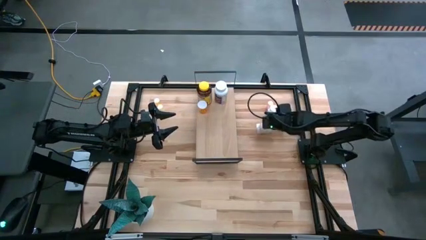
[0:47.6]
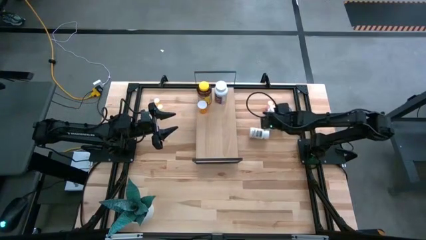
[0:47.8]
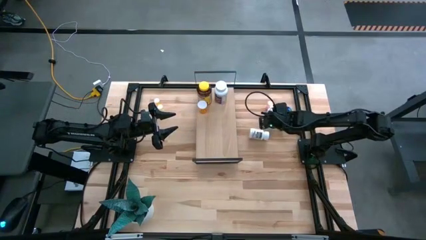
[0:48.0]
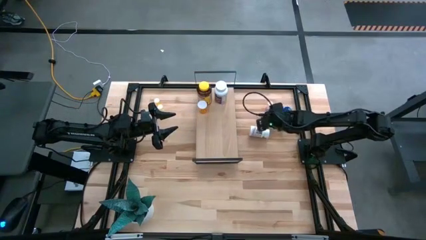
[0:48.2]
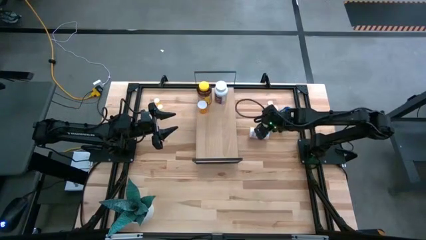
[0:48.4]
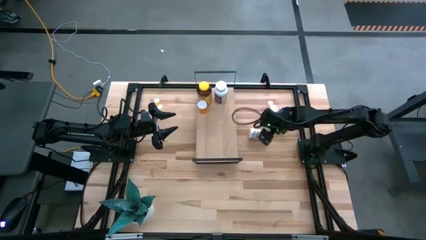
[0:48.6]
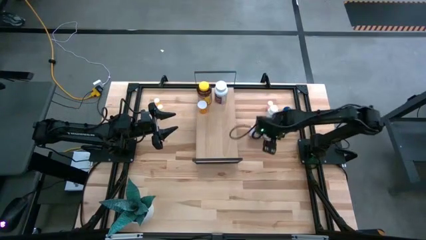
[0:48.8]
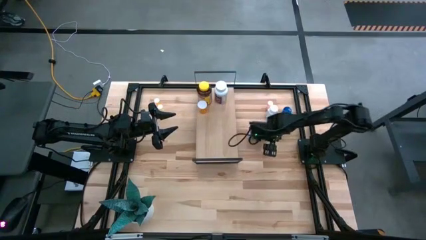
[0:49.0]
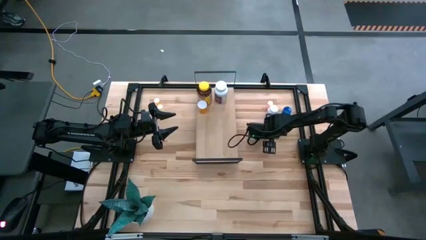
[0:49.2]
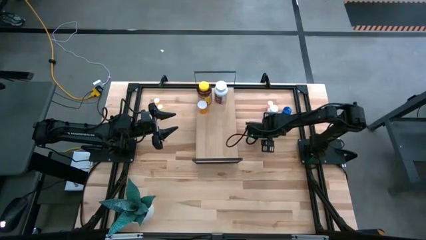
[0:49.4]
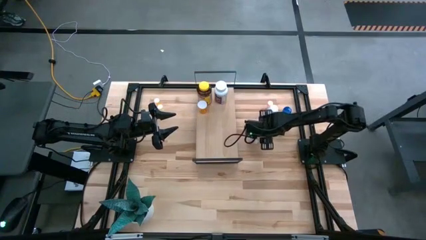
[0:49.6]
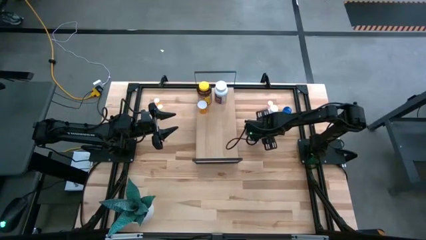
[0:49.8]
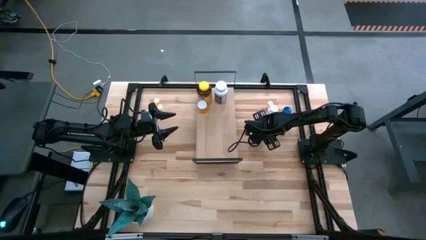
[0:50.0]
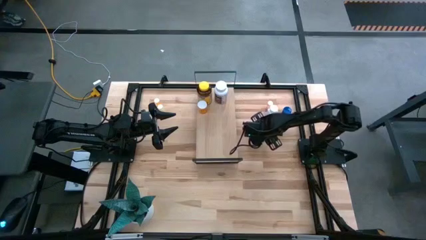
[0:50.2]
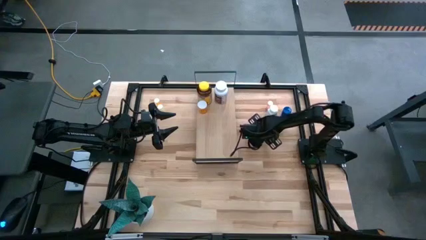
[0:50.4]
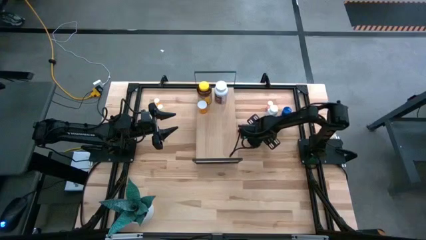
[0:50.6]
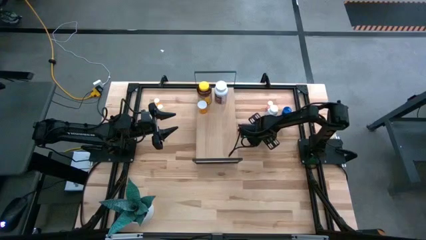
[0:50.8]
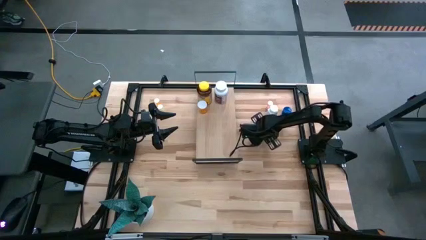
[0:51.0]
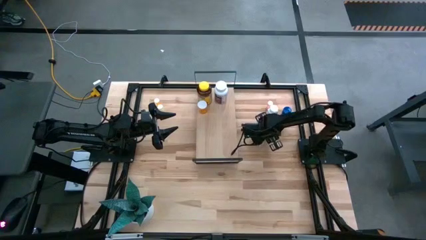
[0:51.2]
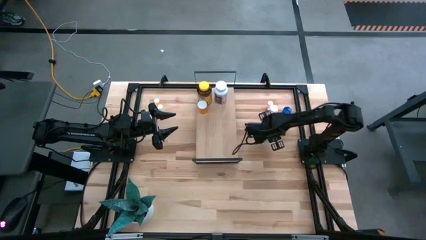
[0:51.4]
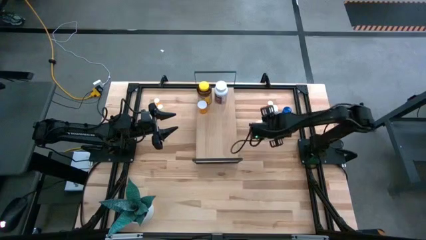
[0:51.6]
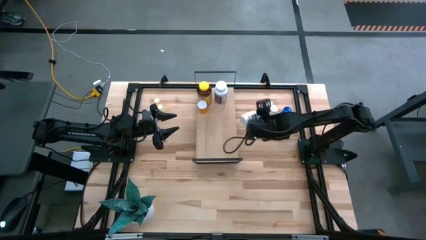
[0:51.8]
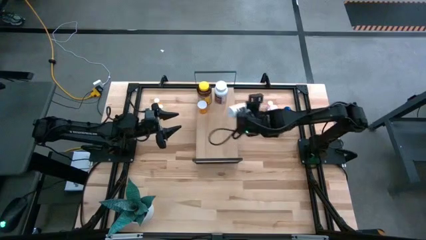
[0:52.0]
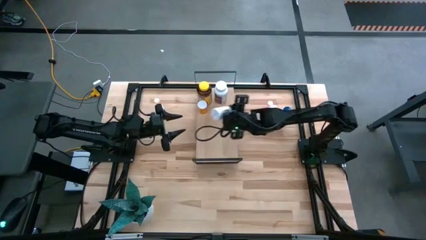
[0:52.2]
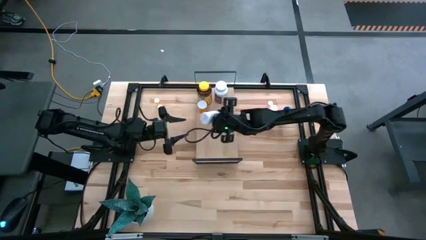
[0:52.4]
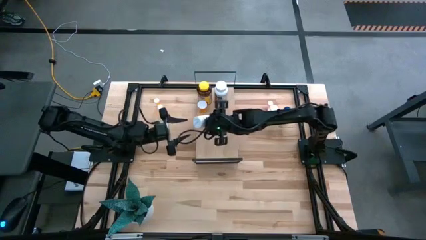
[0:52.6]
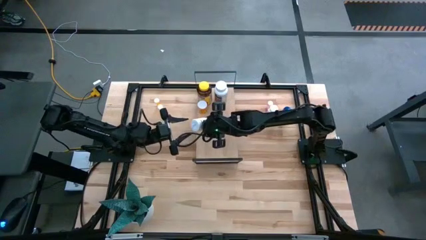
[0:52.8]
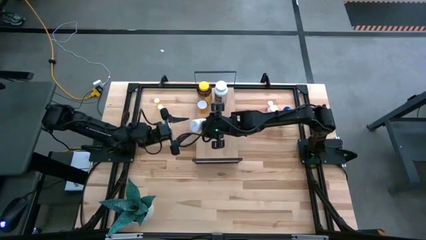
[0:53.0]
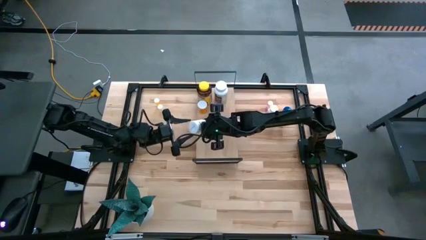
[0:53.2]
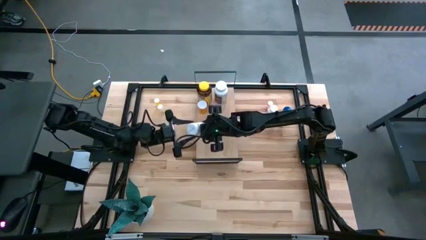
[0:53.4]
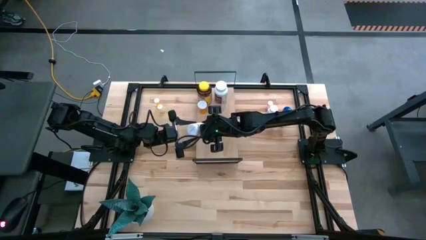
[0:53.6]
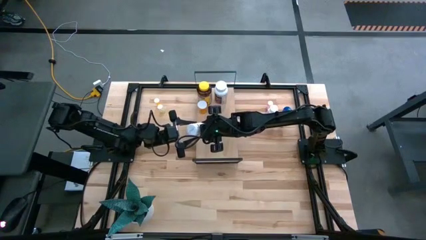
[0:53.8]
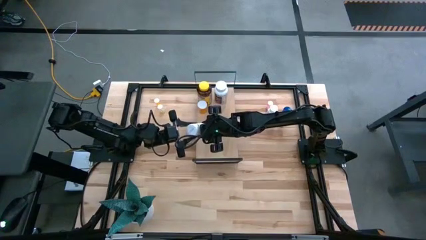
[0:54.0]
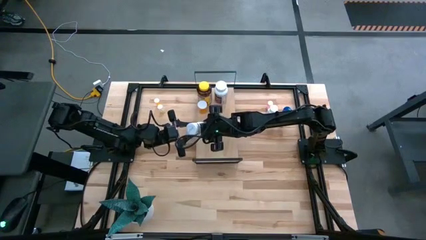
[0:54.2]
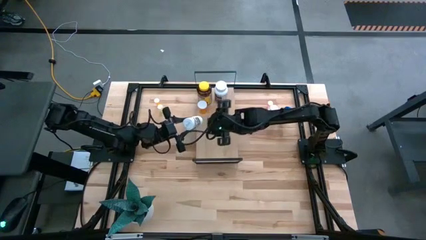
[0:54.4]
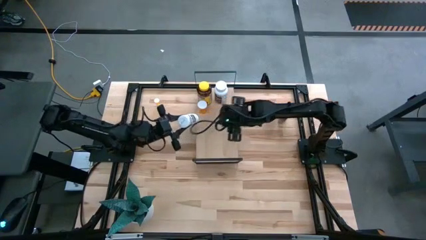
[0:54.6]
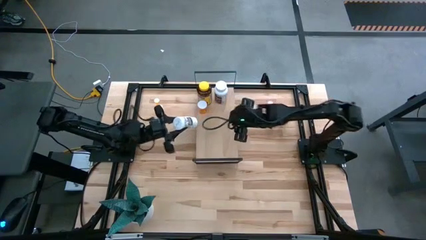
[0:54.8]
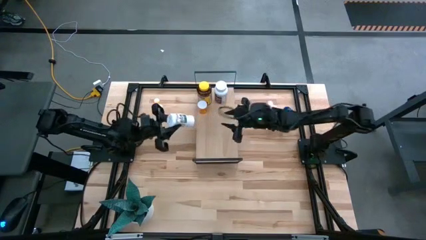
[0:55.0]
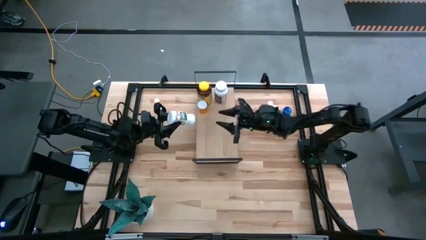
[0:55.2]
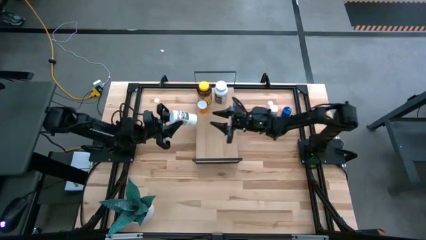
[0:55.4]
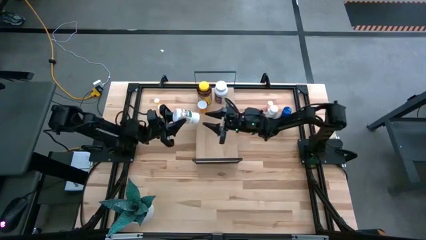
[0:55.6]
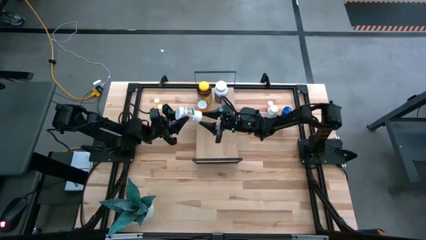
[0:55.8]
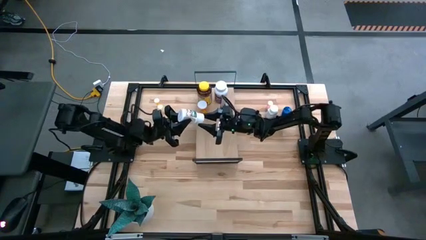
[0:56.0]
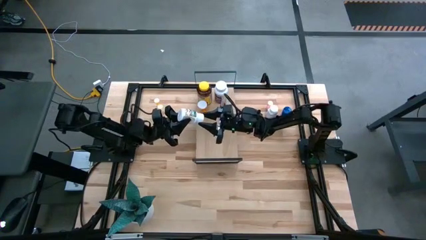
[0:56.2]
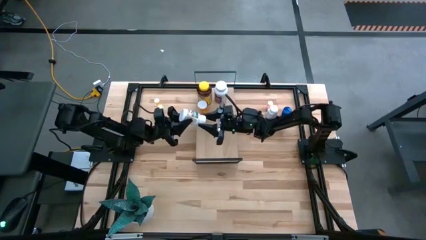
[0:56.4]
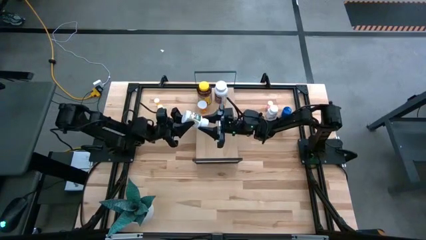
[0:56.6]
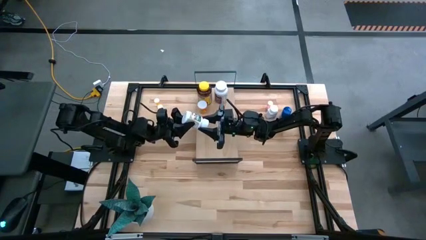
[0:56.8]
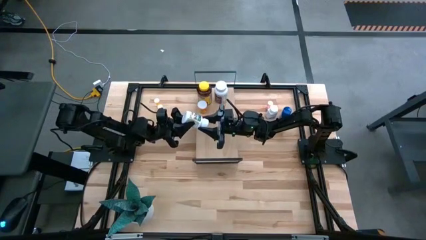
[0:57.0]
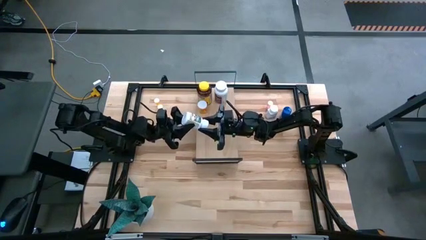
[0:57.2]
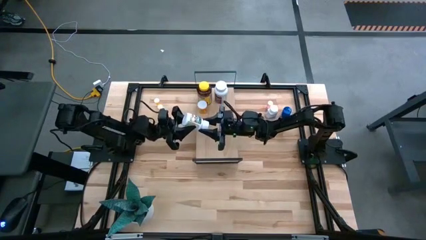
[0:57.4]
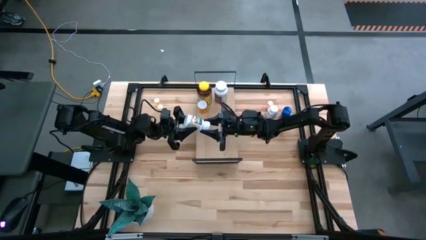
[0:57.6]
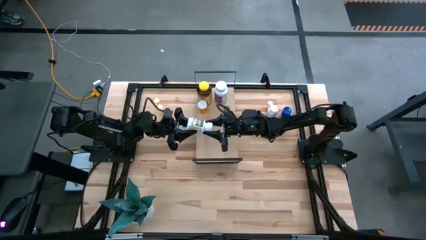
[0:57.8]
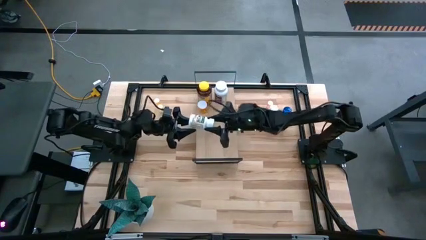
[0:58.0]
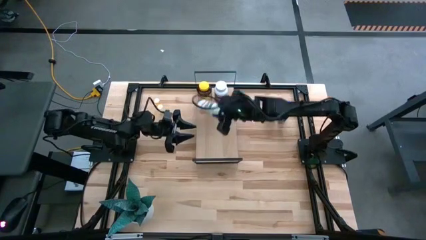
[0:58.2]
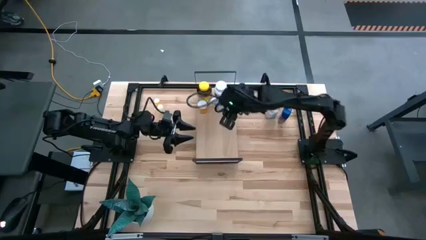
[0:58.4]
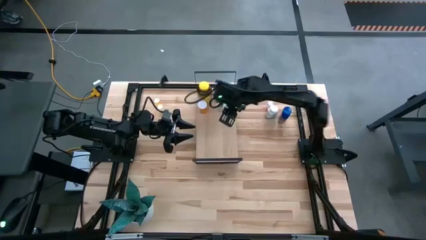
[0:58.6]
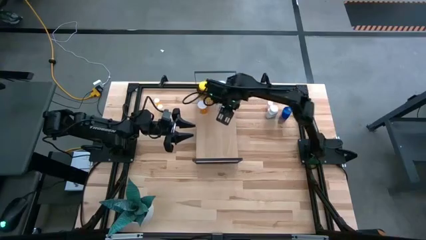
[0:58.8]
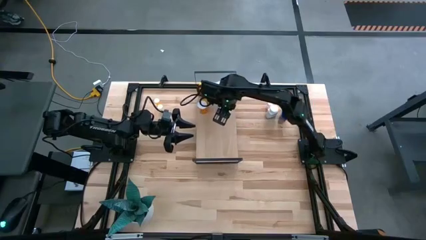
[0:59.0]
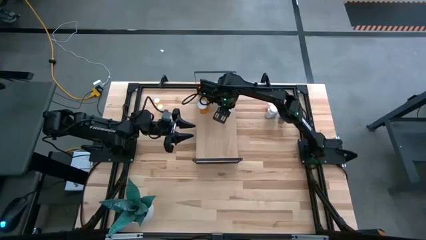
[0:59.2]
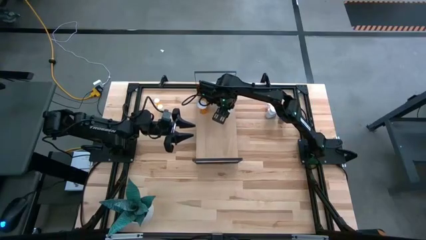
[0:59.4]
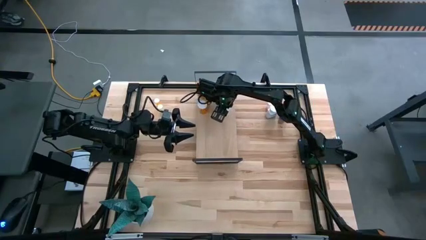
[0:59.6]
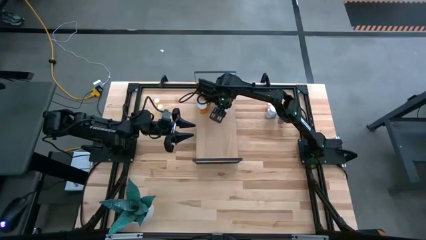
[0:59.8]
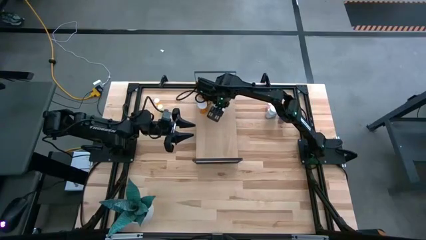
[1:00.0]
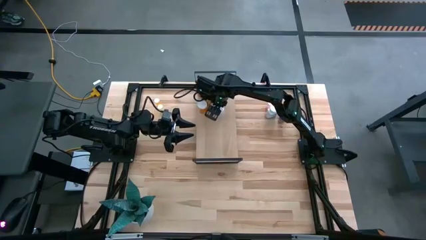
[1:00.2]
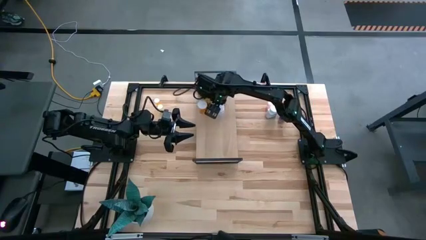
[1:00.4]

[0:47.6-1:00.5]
Task: Pick and place medicine bottles onto shelf by color
Put the white and green medicine bottle on the shelf
